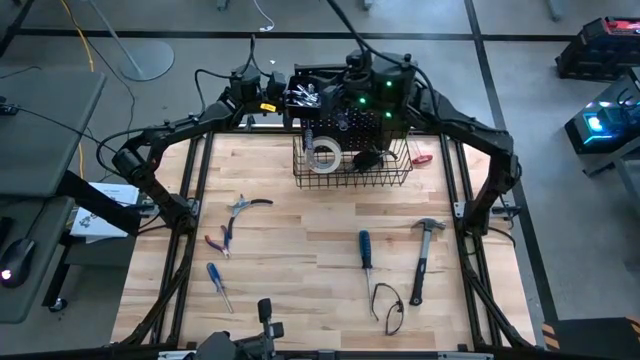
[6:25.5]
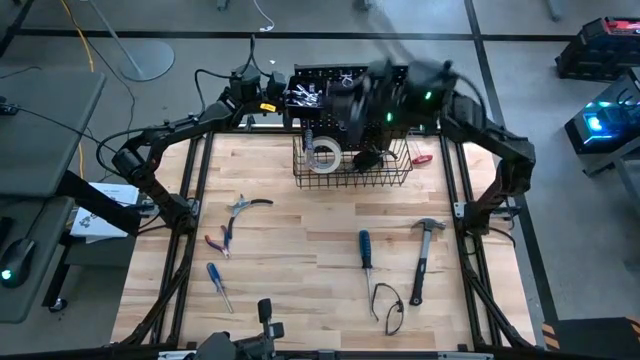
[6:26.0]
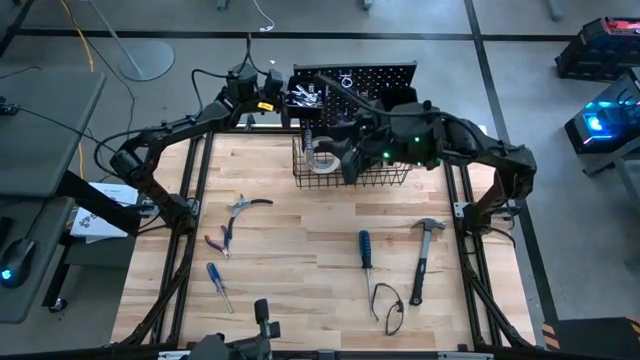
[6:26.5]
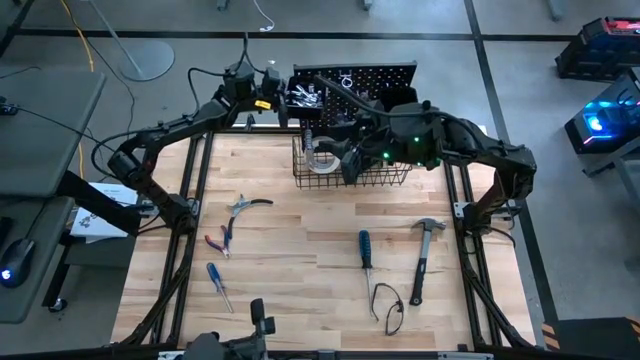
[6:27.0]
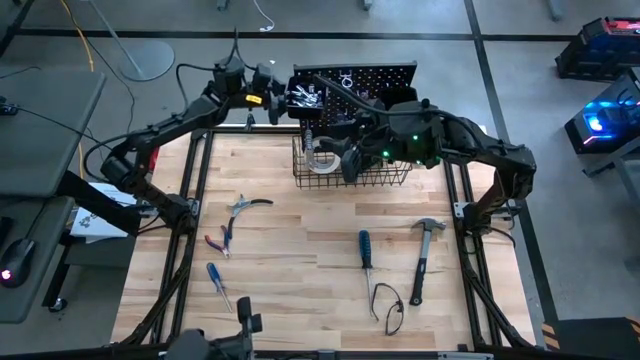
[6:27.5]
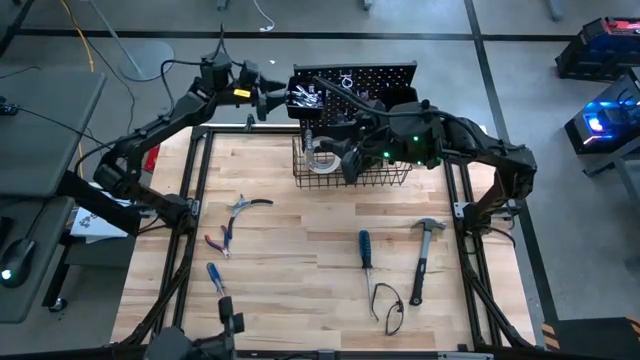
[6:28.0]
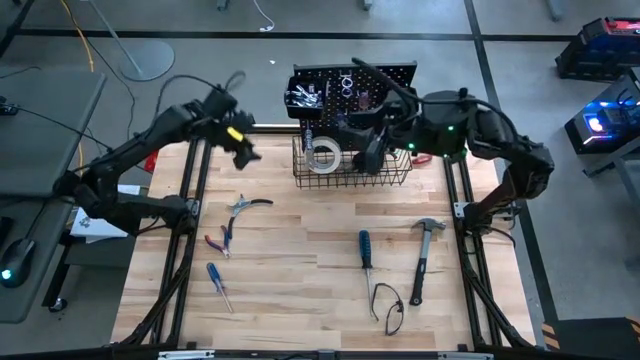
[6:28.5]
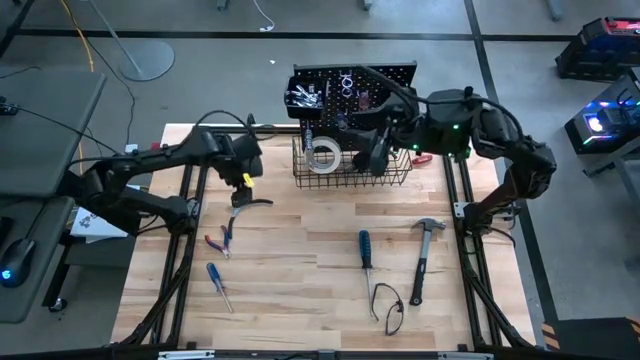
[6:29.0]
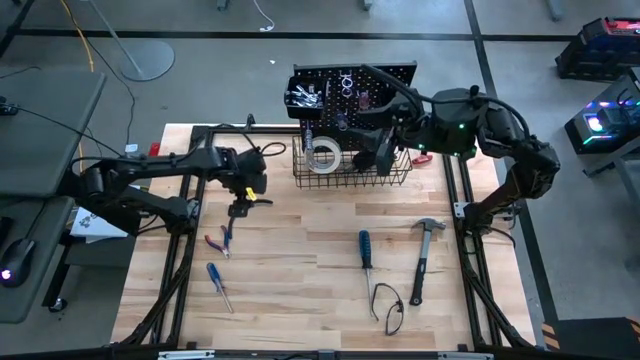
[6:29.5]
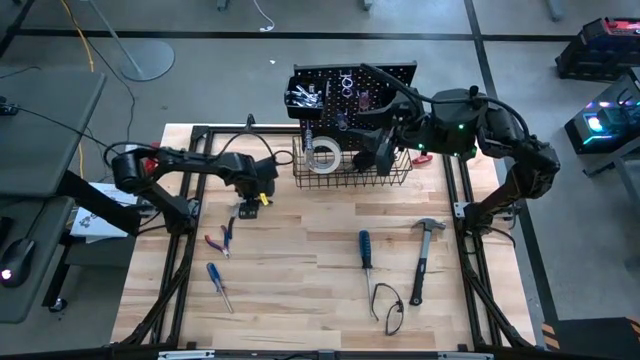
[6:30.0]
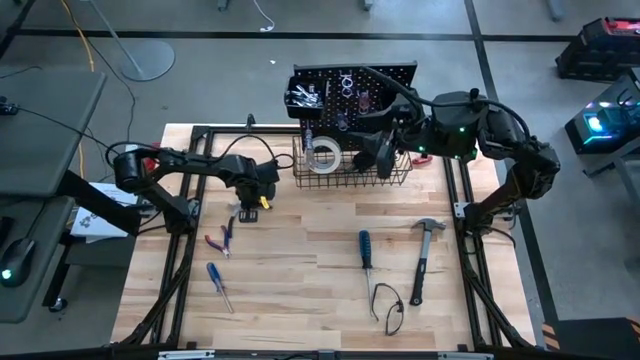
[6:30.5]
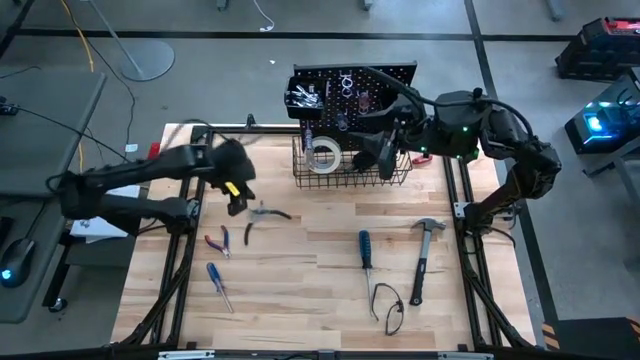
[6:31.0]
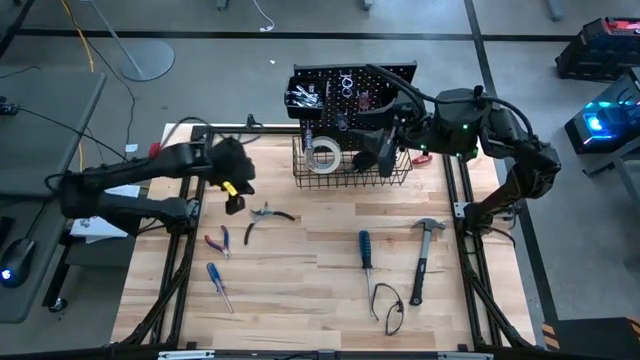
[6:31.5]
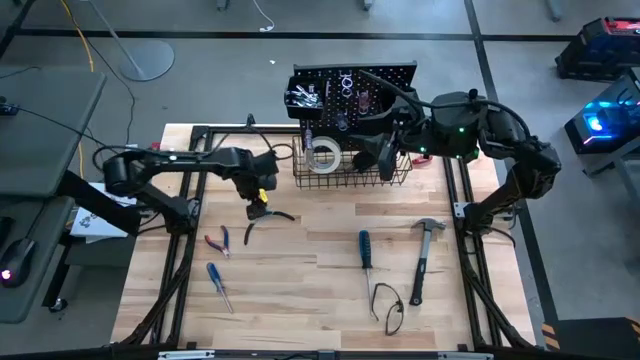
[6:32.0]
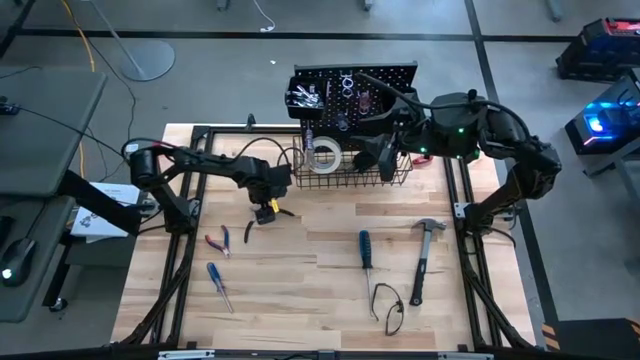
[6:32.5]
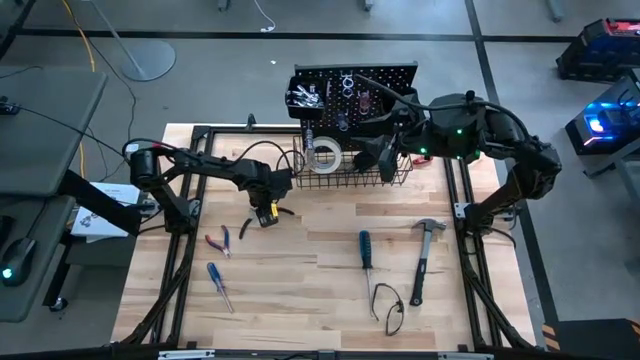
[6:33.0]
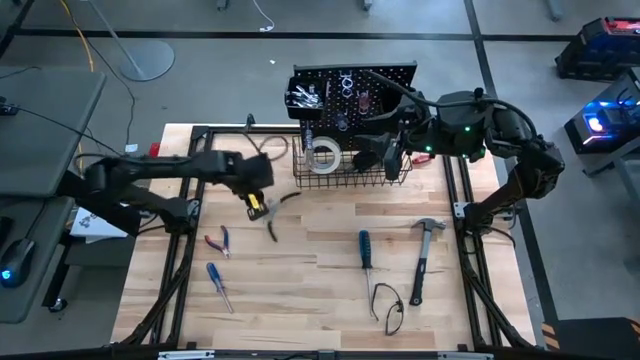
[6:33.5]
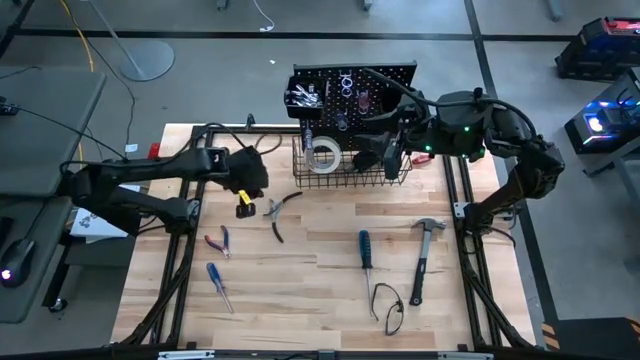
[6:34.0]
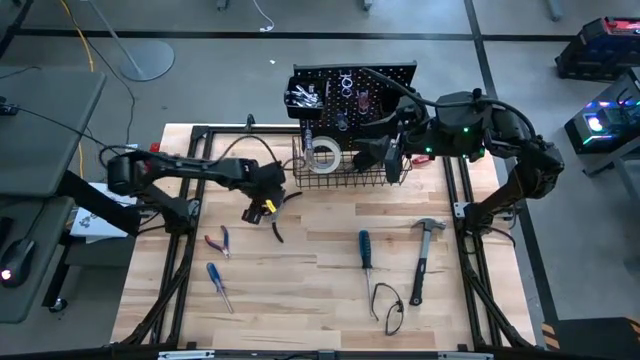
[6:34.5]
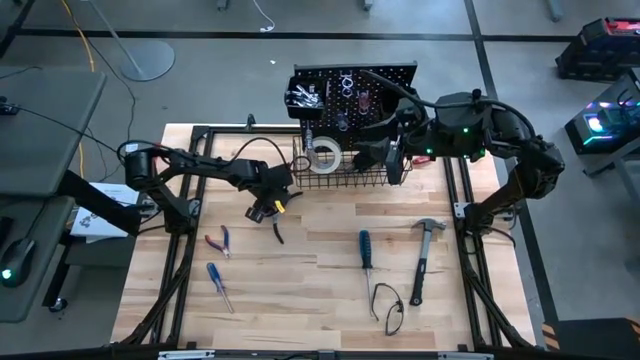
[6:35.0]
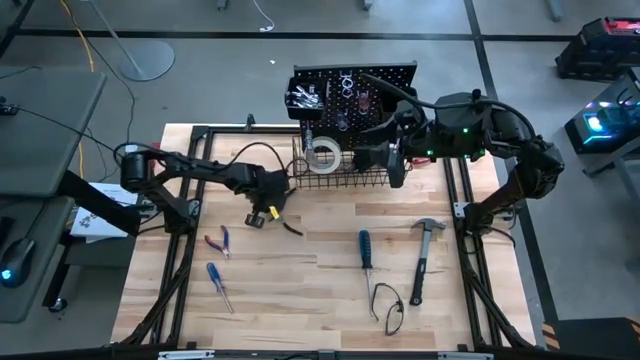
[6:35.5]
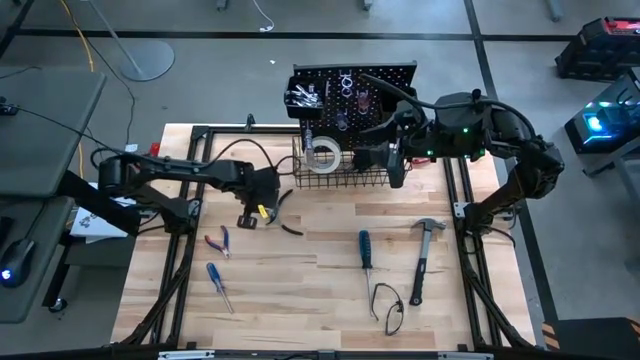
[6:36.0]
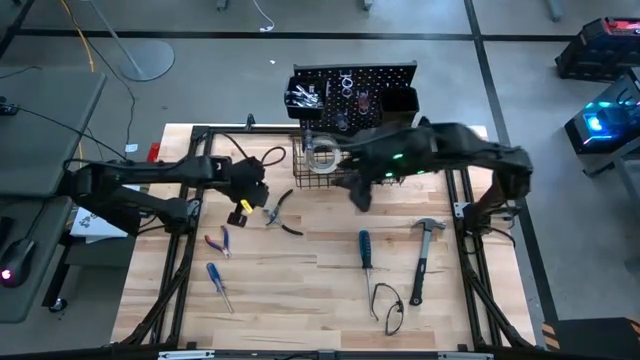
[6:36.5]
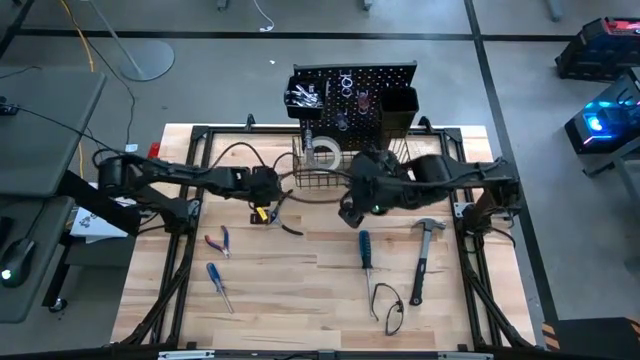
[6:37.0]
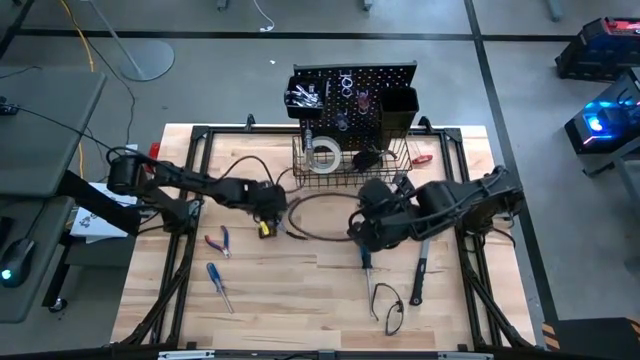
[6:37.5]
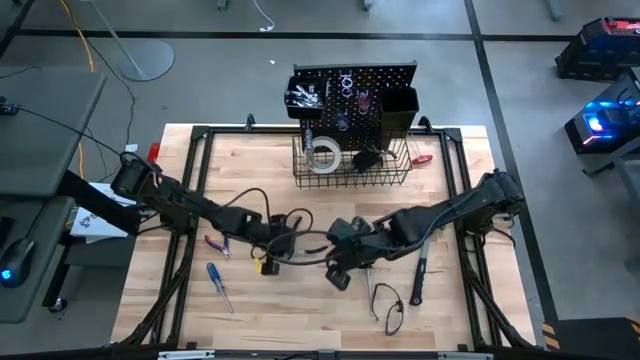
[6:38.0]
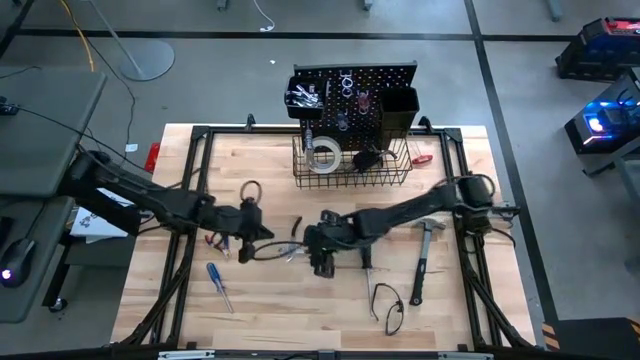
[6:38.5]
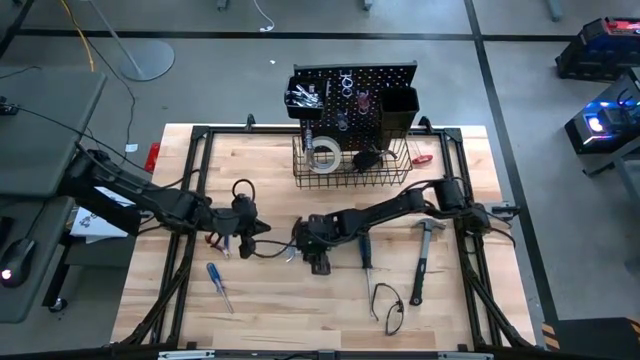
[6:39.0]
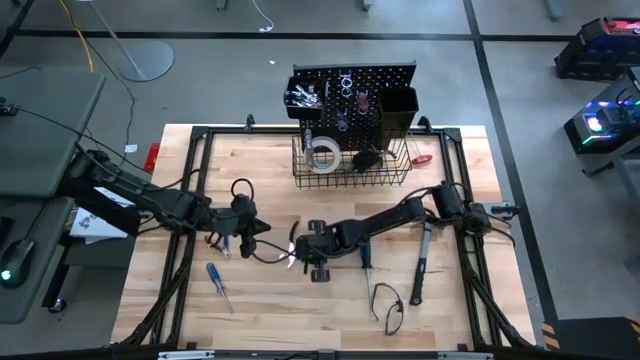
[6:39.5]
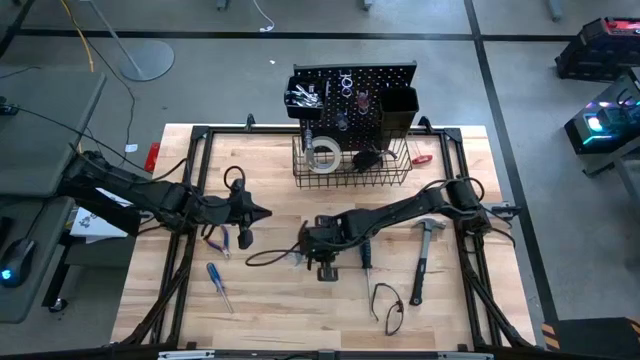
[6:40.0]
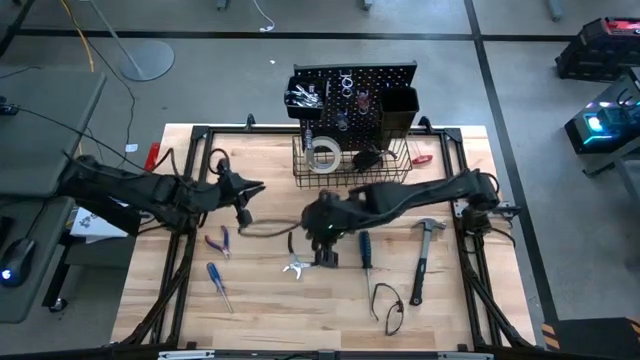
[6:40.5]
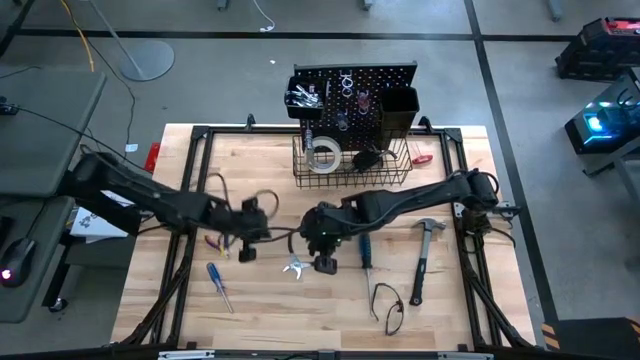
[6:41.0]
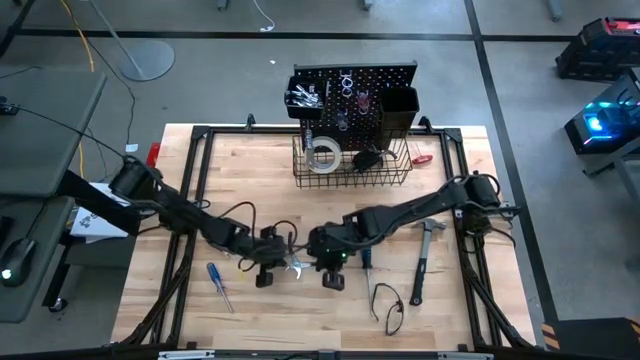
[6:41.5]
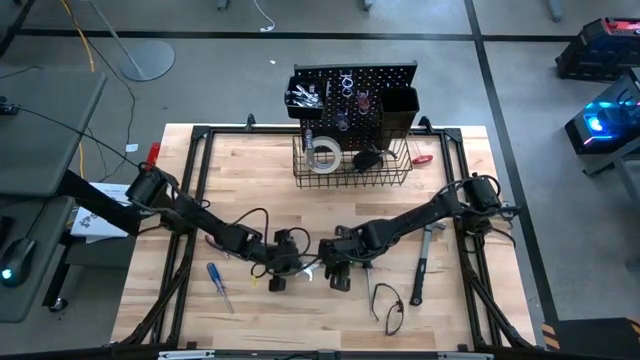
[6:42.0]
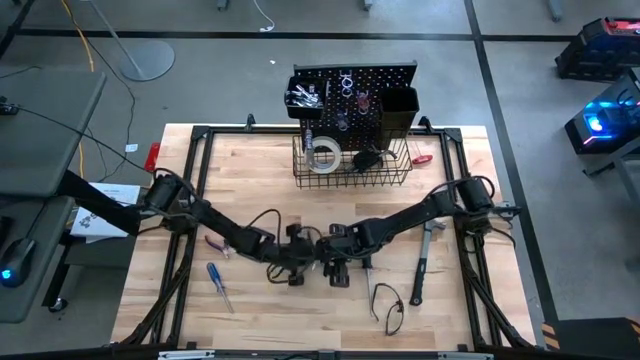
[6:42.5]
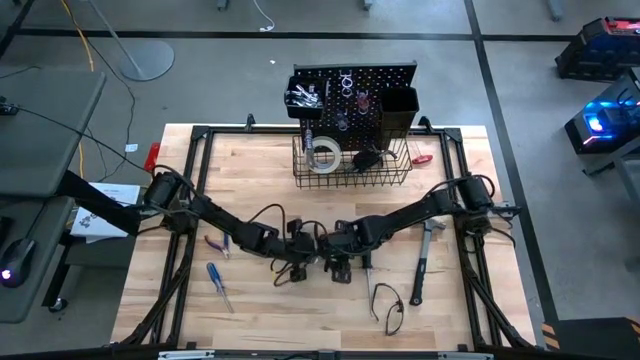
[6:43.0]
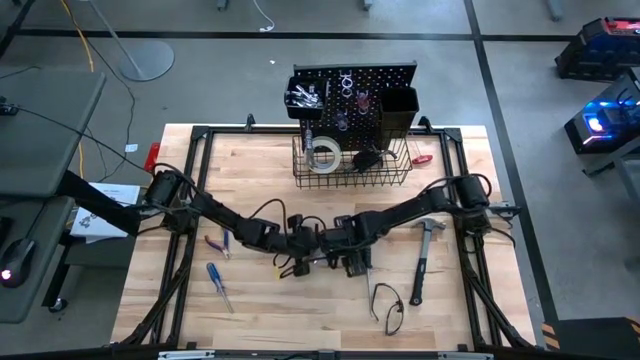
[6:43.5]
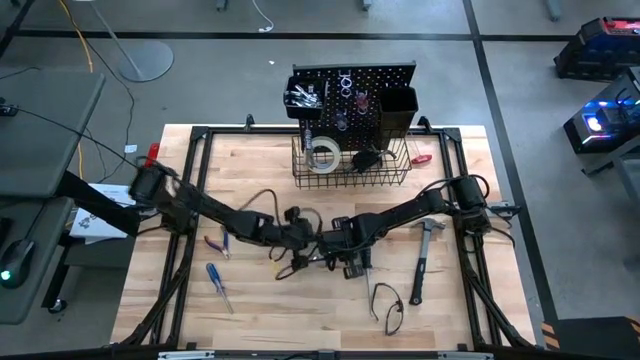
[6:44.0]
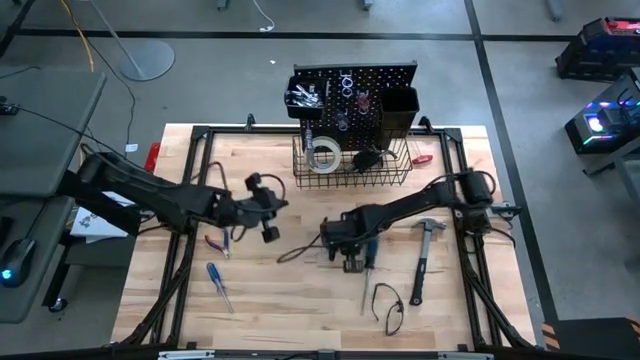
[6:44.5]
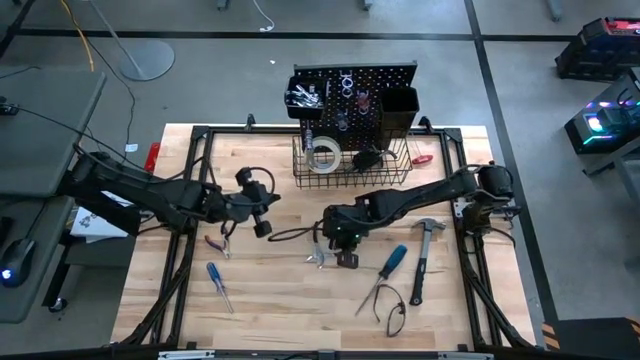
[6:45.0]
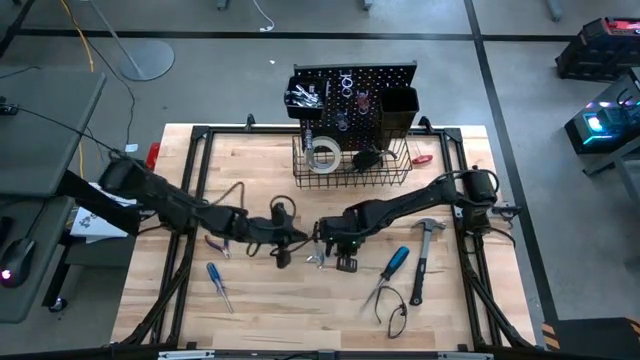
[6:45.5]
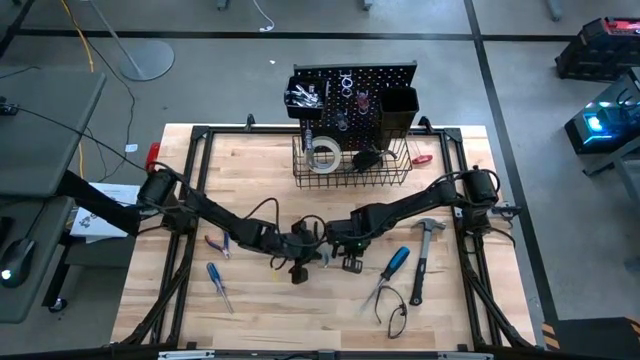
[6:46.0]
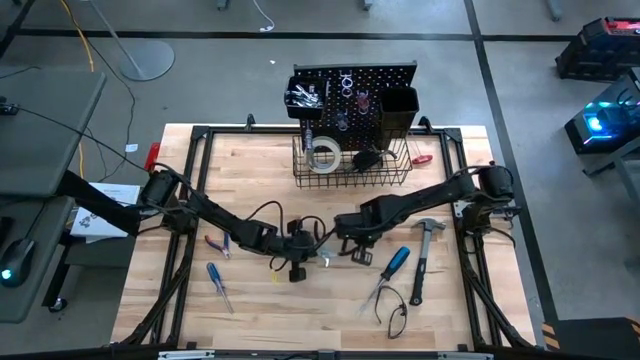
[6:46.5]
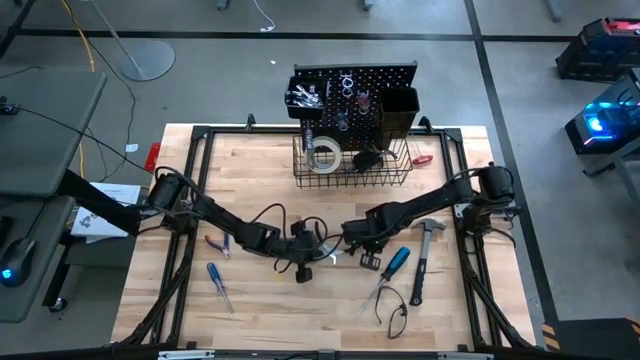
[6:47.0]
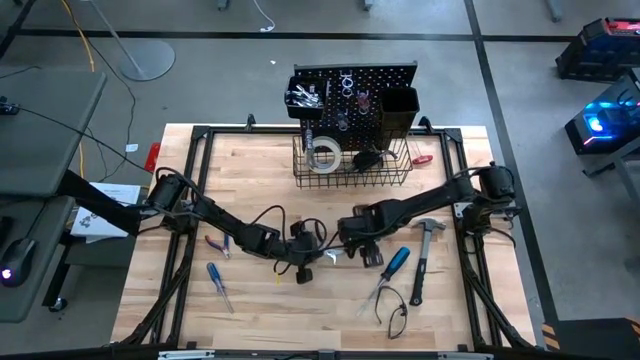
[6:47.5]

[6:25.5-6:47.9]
Task: Hang tools onto peg board
Put the black plier in the right black bin on the pegboard
